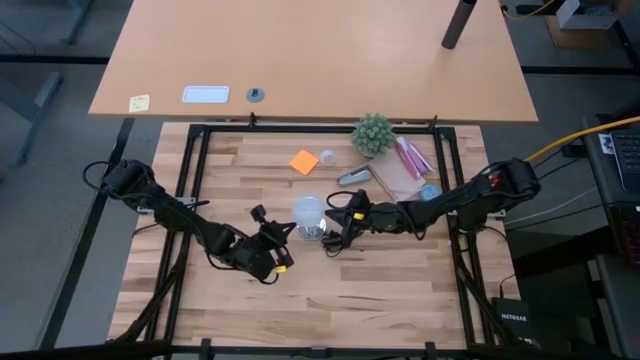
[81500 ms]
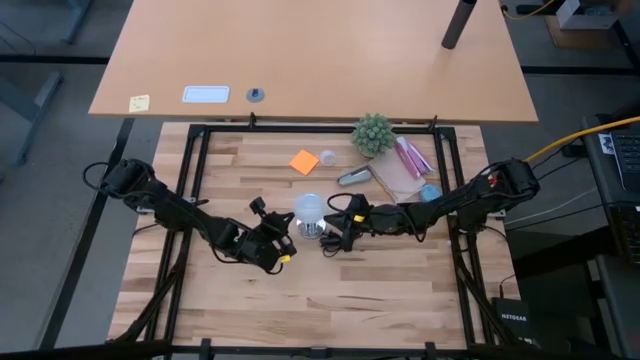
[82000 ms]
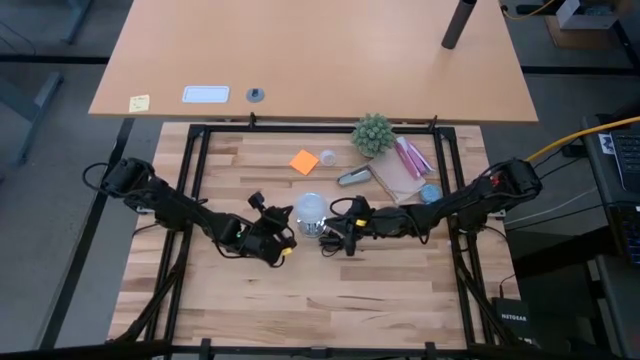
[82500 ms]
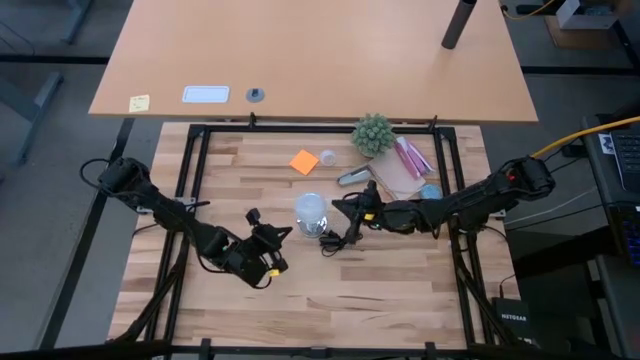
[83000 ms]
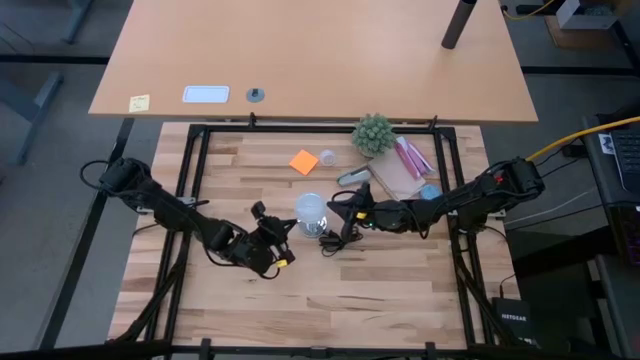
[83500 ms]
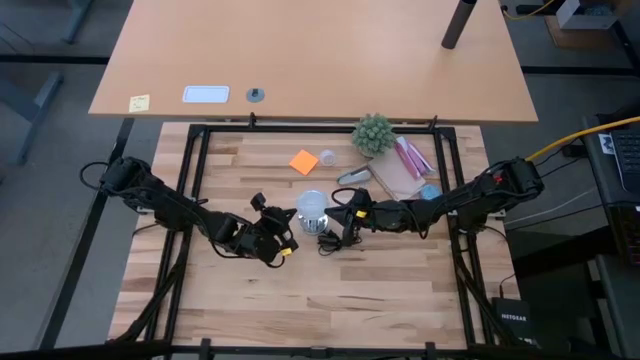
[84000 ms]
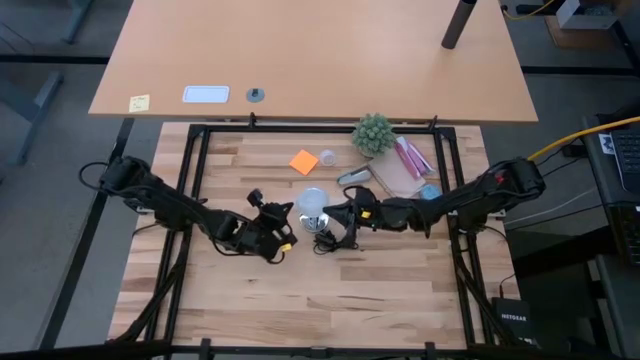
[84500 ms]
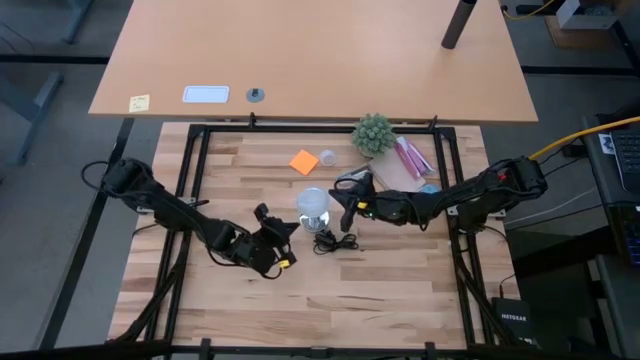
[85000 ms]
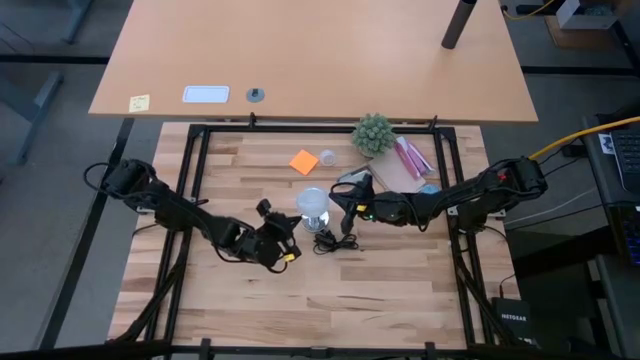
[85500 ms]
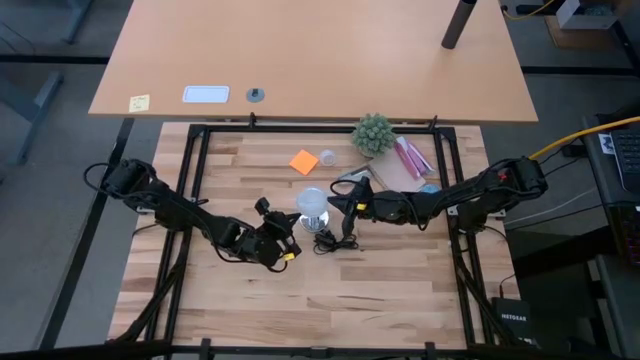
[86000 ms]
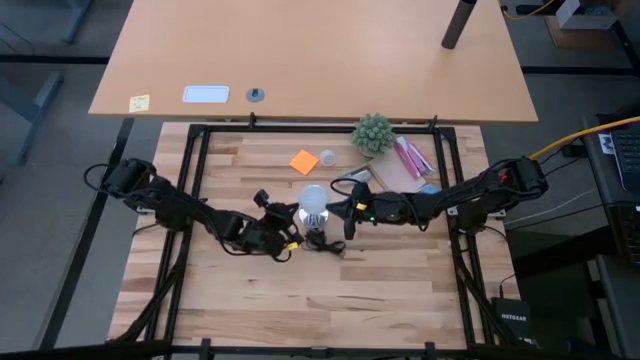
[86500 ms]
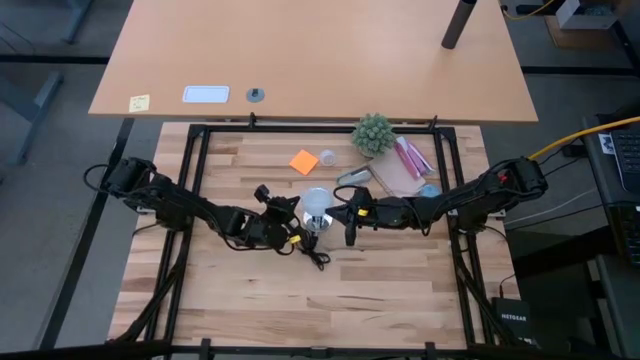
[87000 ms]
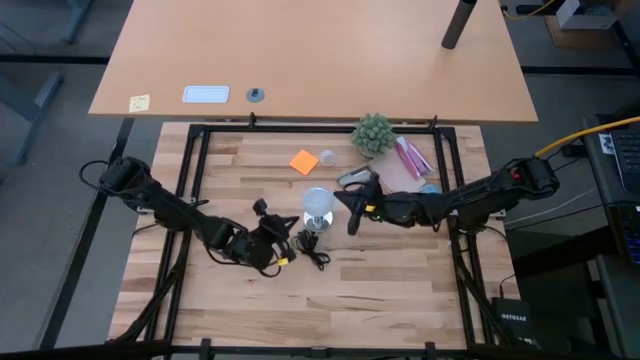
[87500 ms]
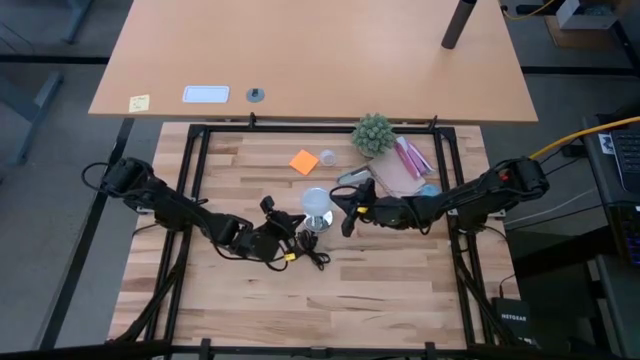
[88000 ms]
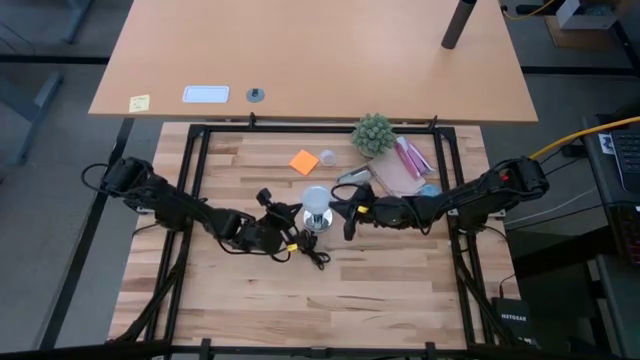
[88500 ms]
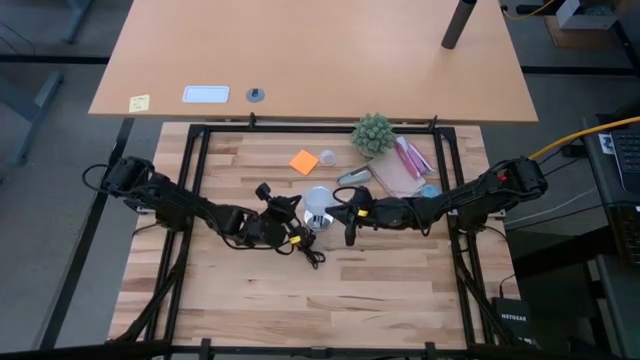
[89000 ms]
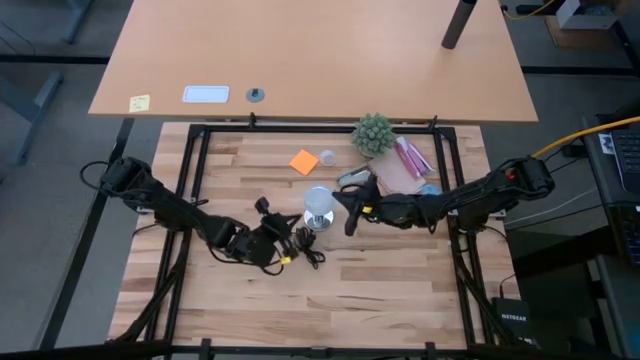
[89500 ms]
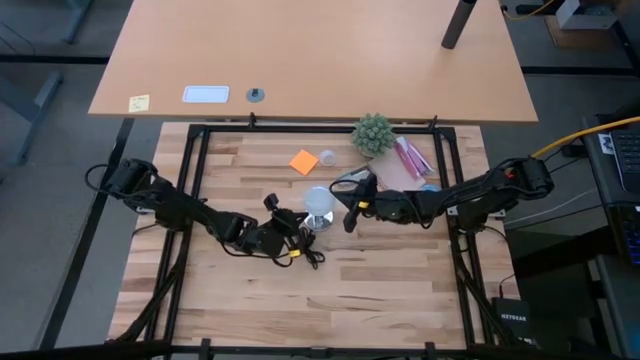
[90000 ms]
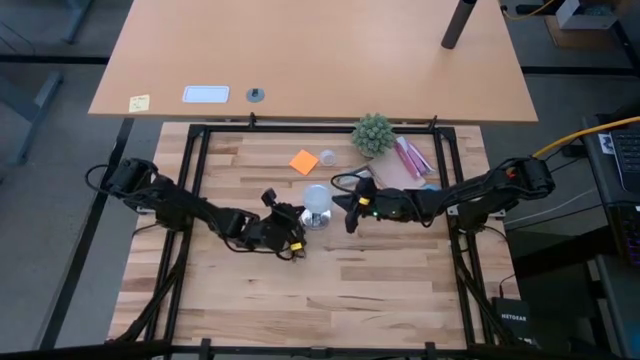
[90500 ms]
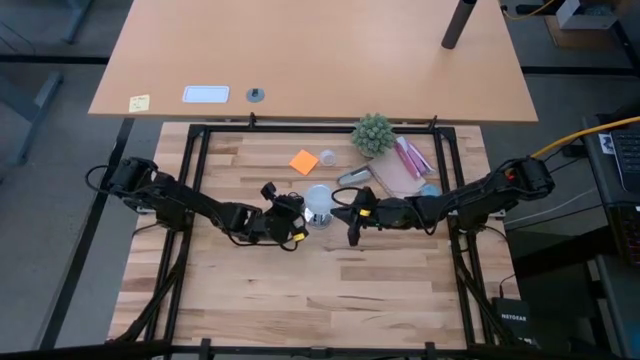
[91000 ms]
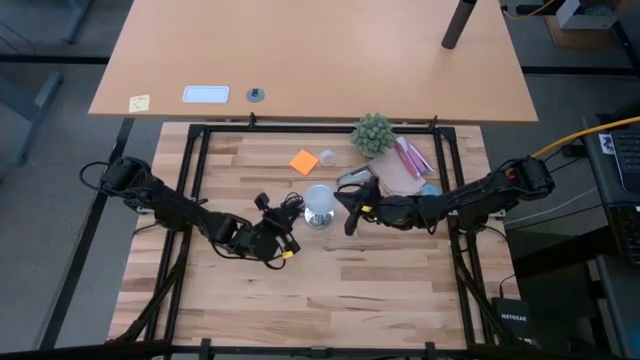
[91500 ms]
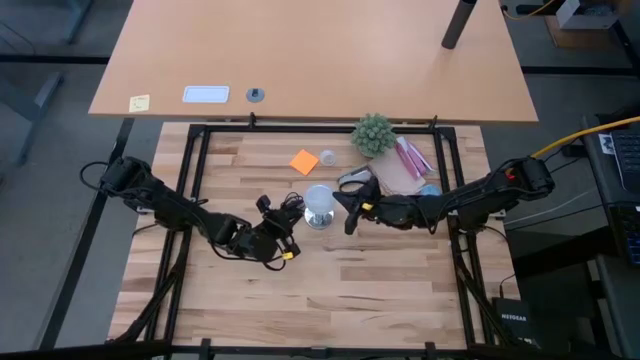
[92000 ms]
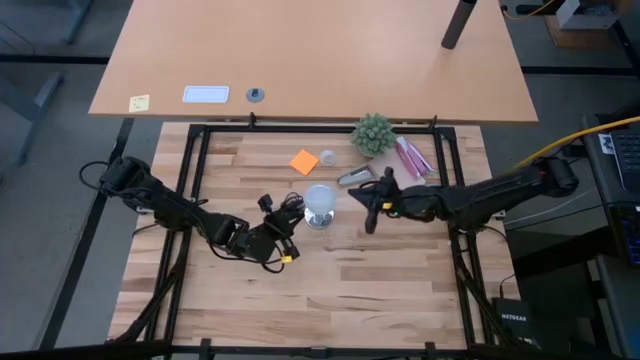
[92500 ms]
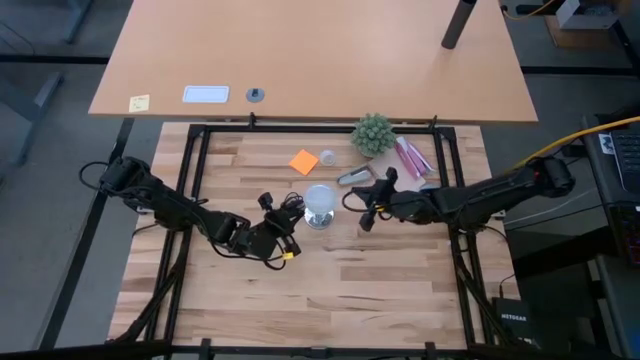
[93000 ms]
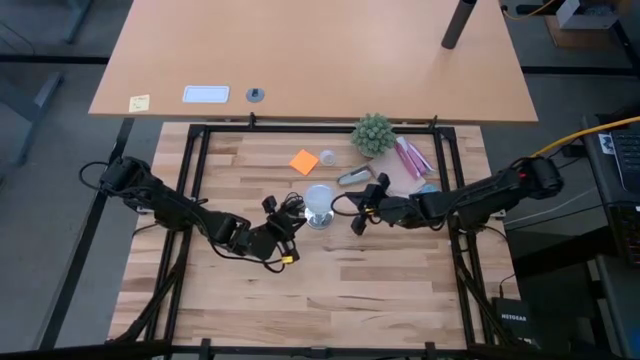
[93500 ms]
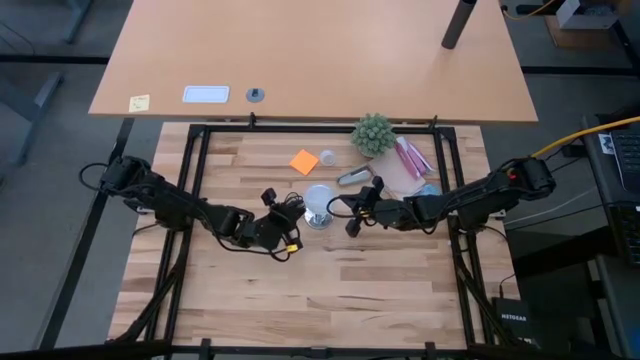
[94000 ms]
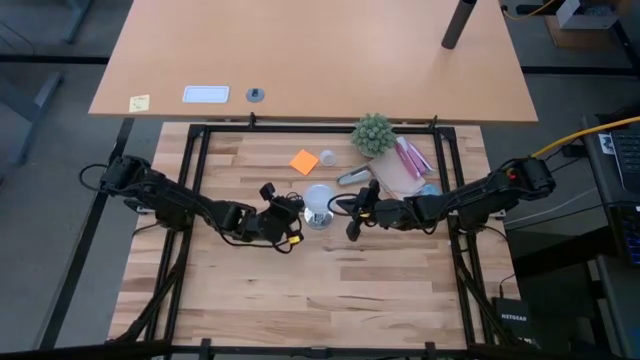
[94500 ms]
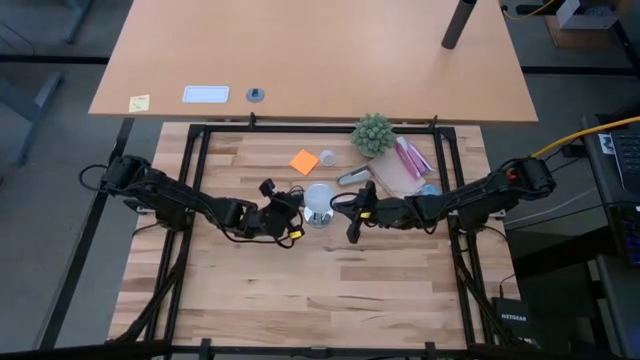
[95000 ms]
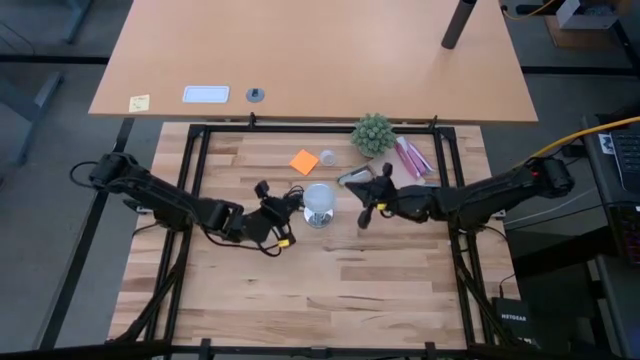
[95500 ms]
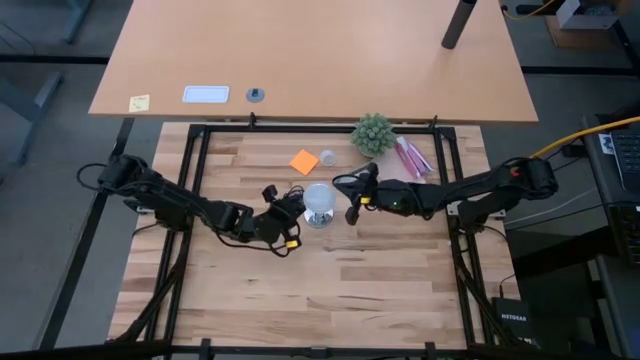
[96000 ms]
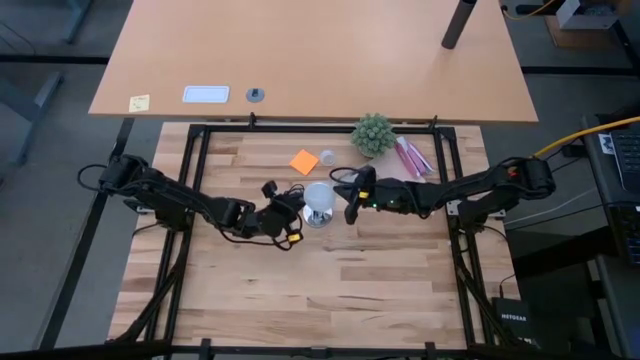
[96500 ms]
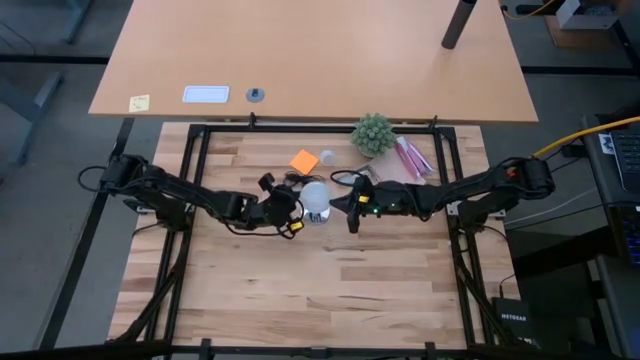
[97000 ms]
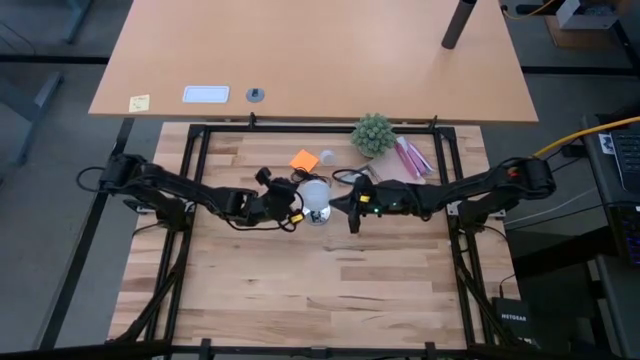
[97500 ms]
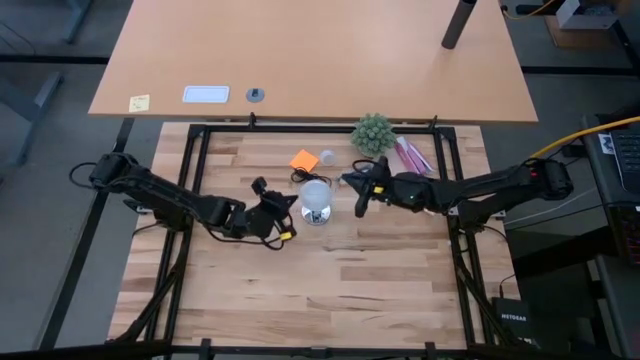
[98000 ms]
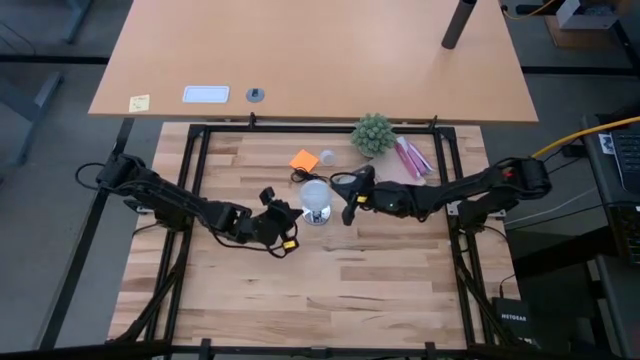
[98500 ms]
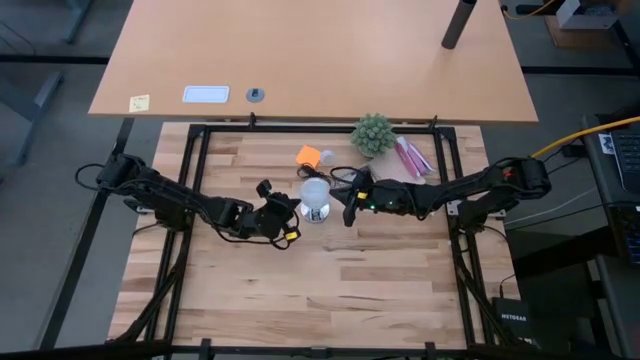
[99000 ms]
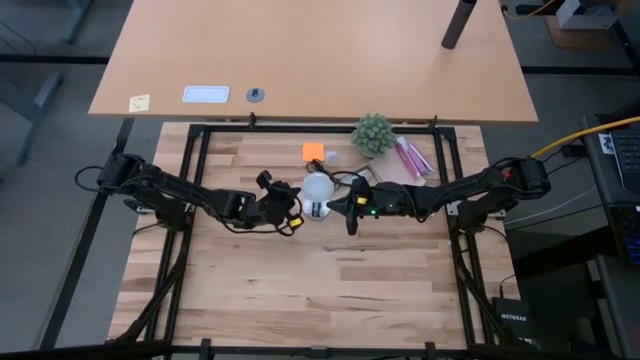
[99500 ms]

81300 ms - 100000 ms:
Task: Screw lightbulb
Insert the lightbulb in the silver lamp
